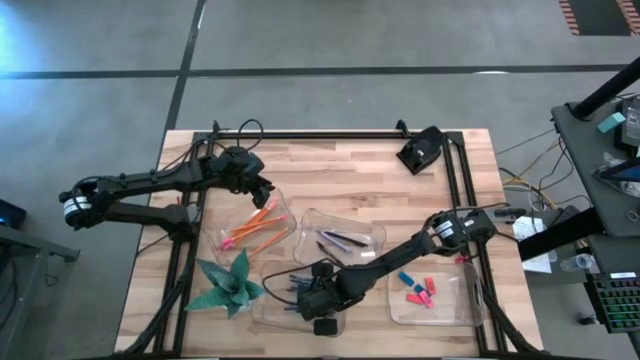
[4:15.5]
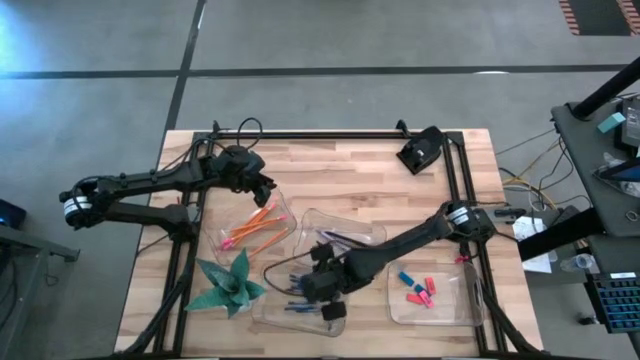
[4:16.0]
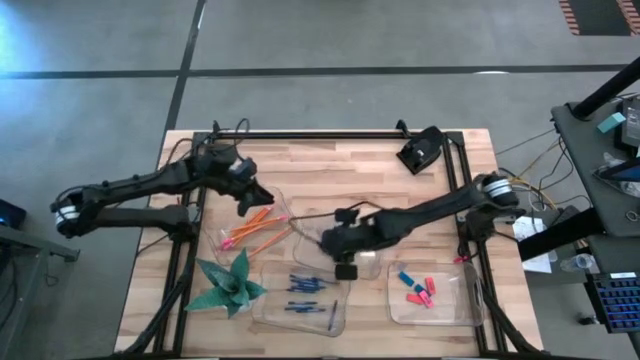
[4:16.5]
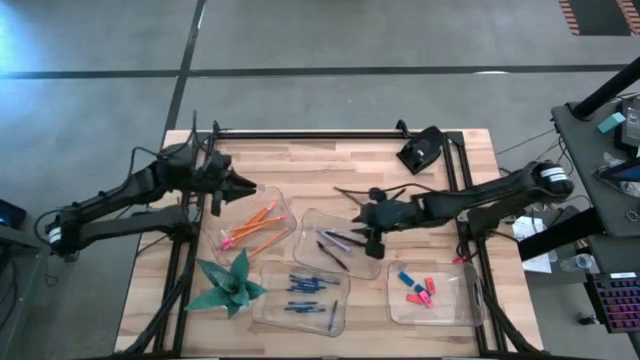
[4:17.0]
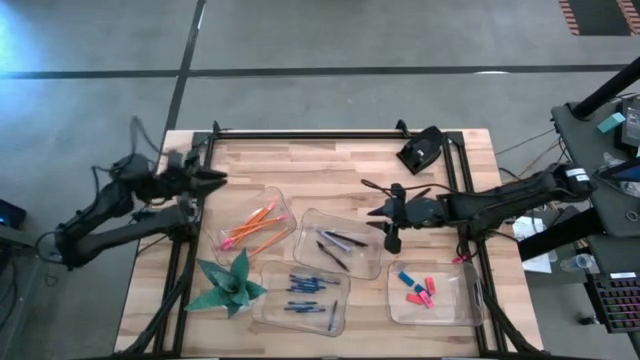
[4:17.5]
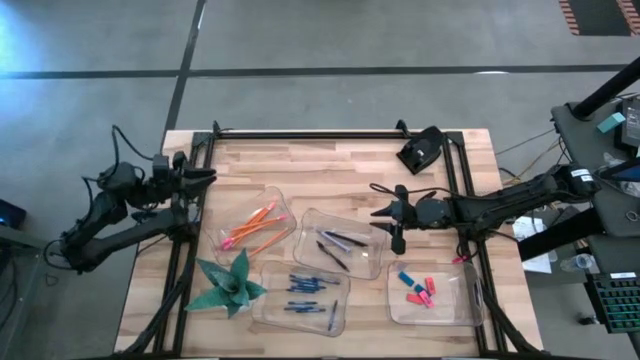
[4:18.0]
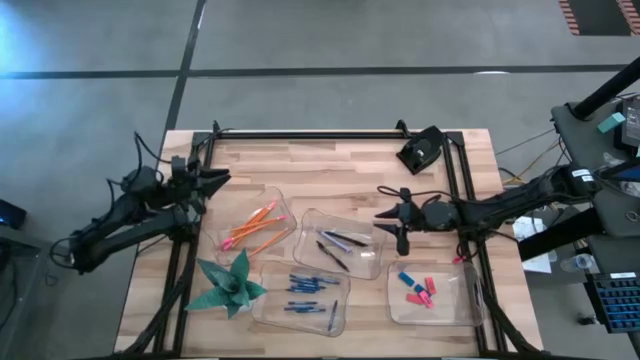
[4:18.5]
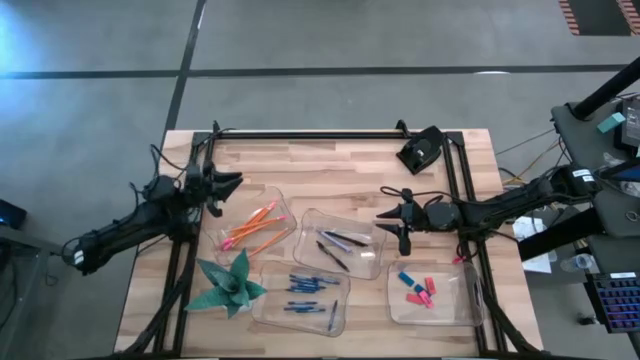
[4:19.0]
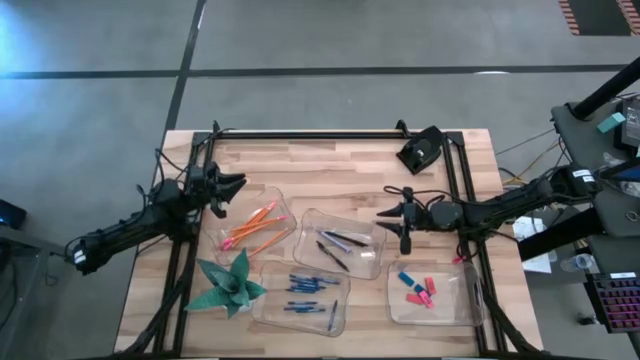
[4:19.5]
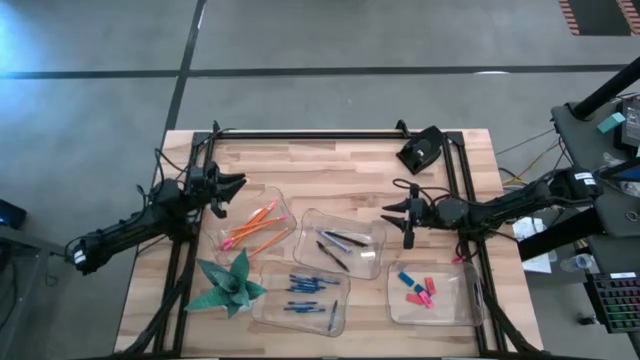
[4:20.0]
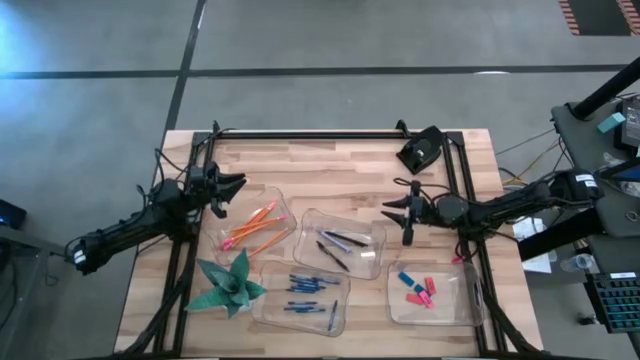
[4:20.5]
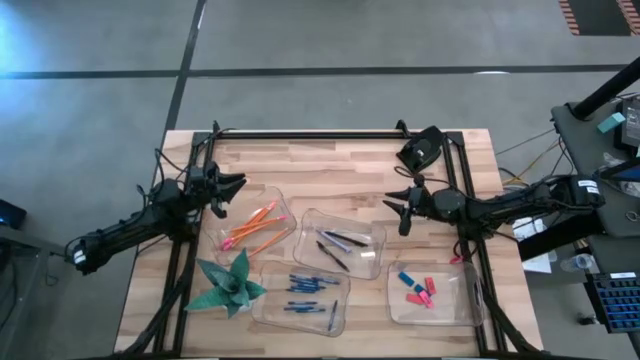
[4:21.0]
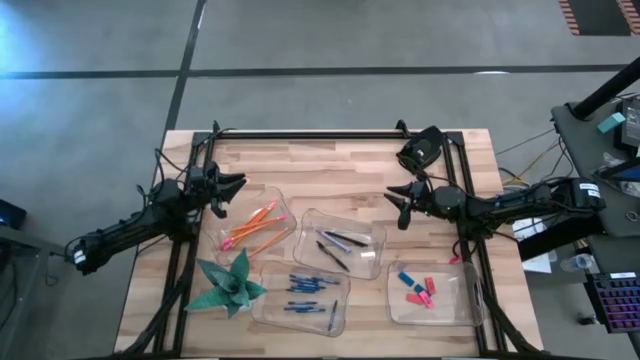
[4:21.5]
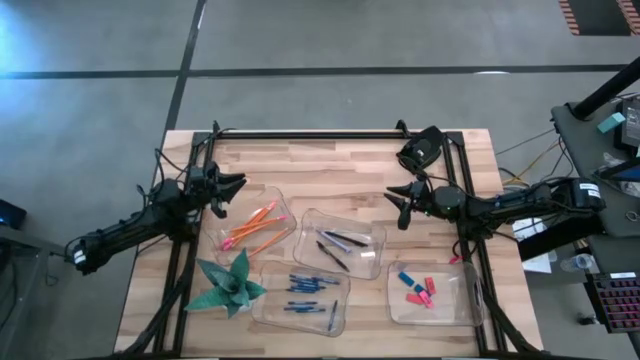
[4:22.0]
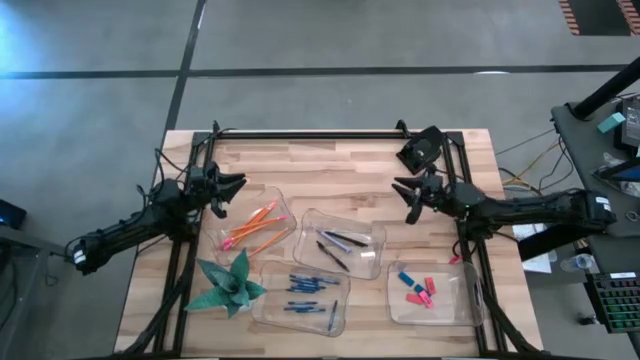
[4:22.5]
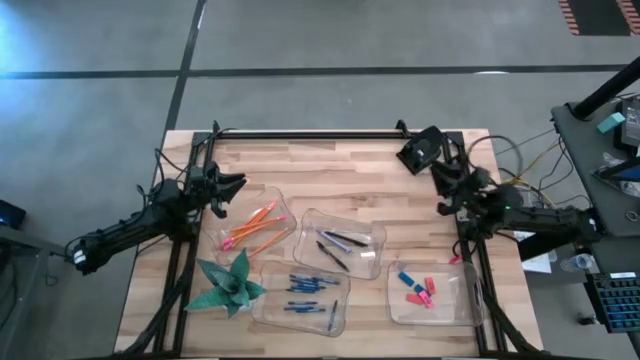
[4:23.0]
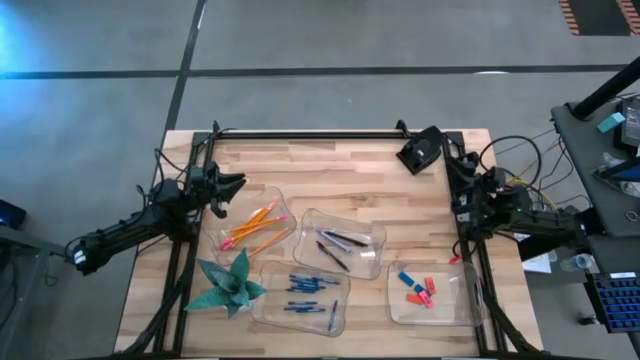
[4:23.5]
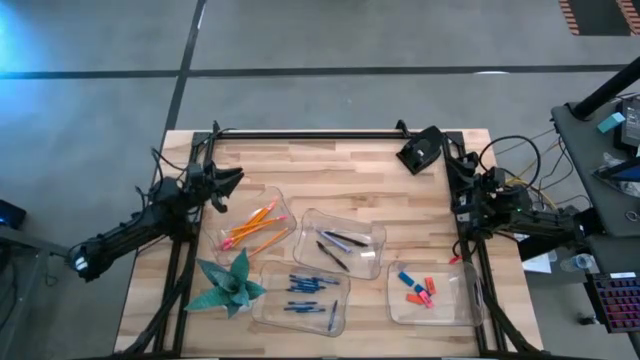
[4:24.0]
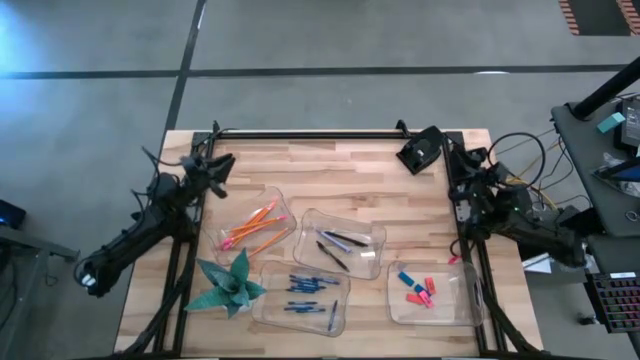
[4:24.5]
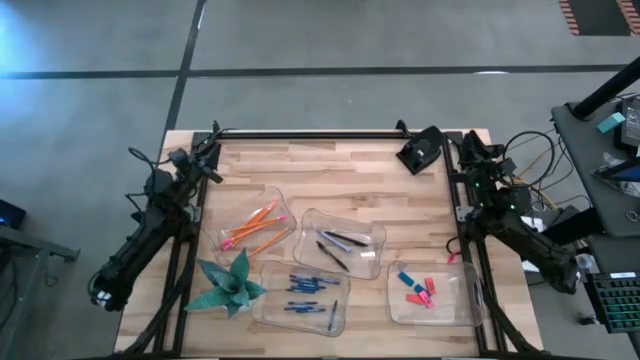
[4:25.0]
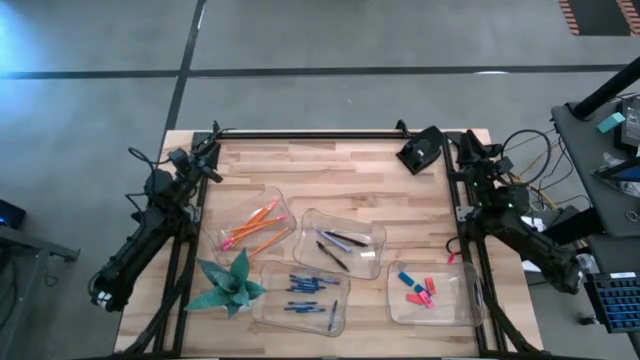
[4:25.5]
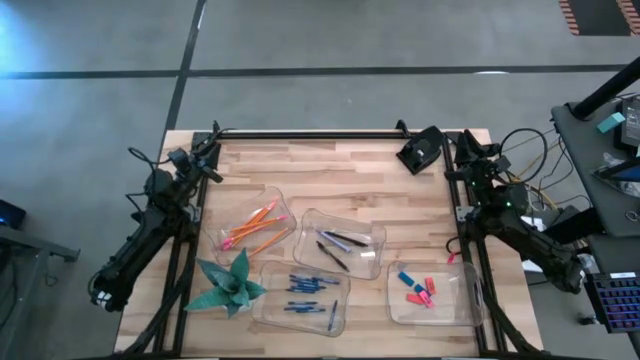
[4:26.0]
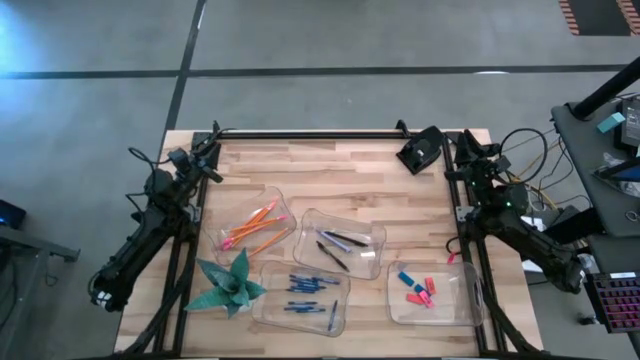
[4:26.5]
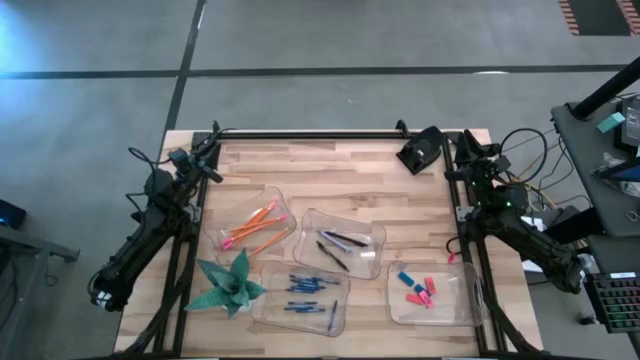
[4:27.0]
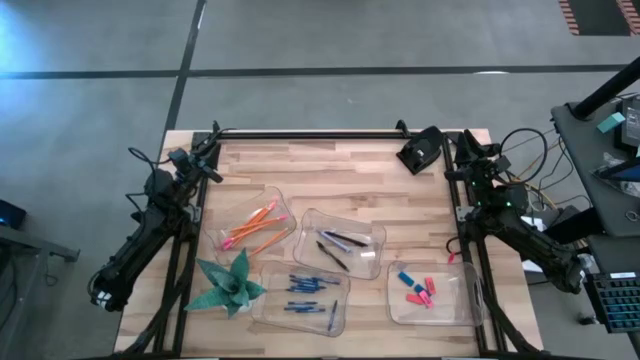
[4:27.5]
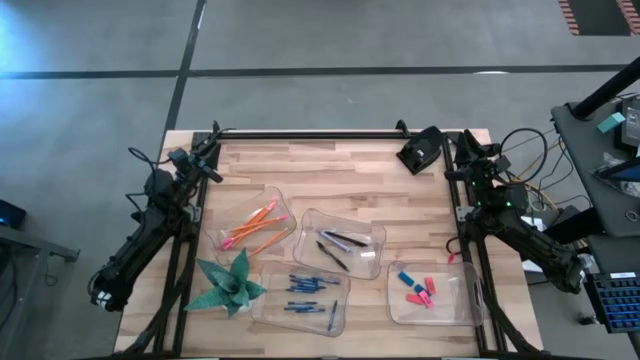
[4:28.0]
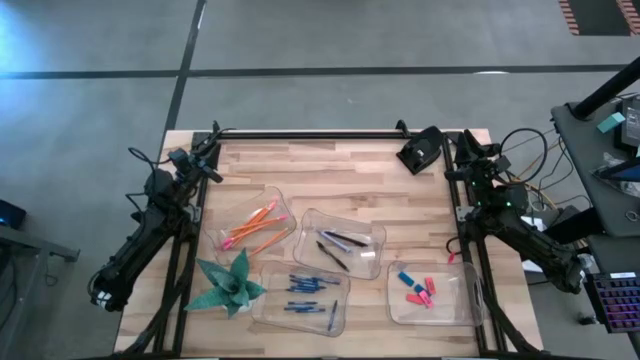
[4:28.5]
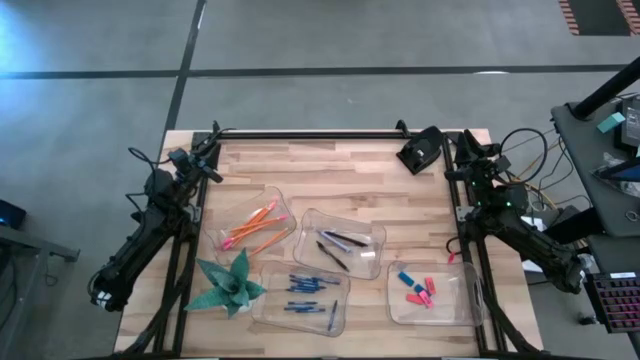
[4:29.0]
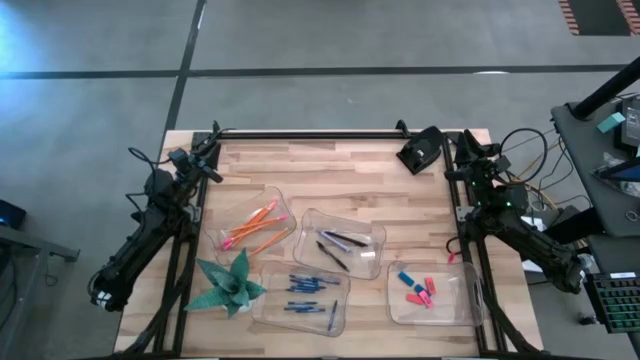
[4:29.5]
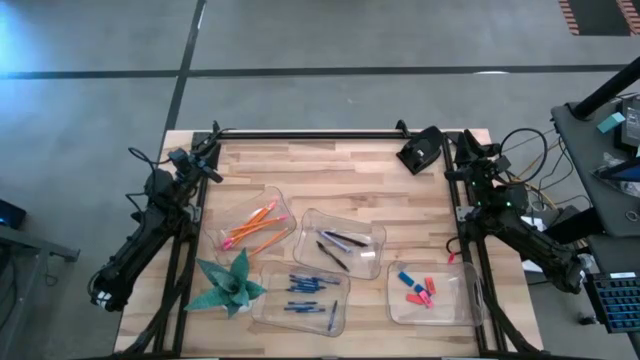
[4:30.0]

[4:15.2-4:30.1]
Task: Sort crayons/erasers/pens/pencils in bins
Return to Home Position

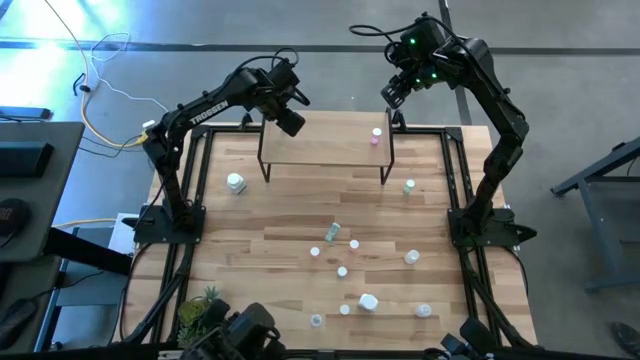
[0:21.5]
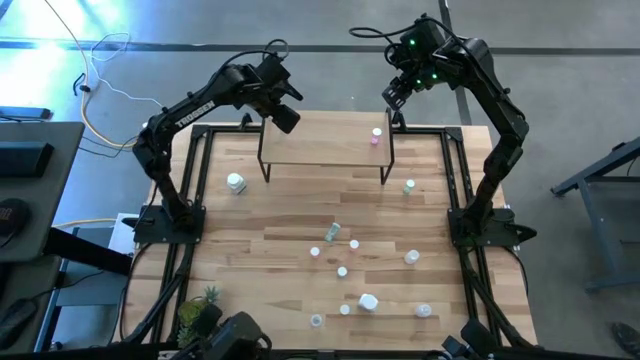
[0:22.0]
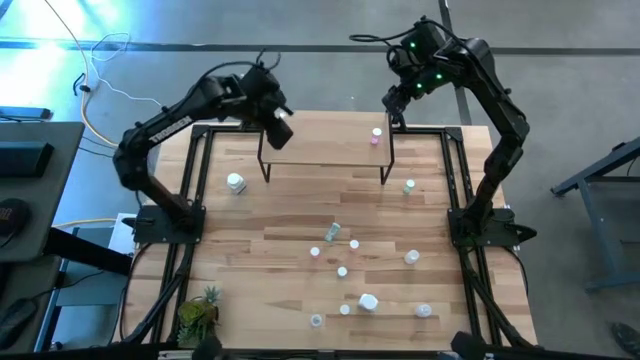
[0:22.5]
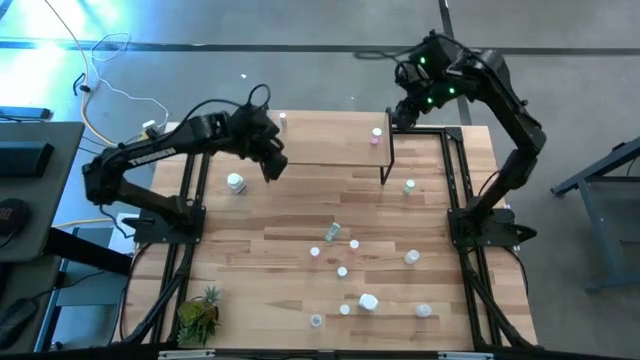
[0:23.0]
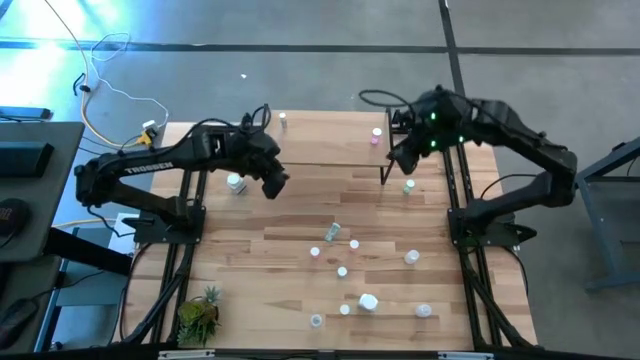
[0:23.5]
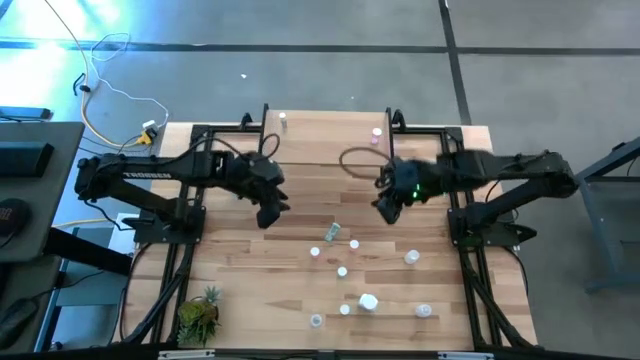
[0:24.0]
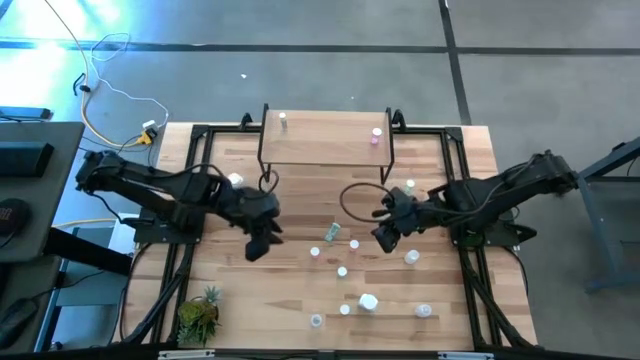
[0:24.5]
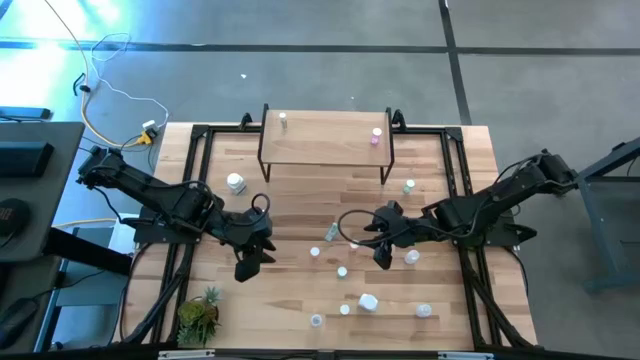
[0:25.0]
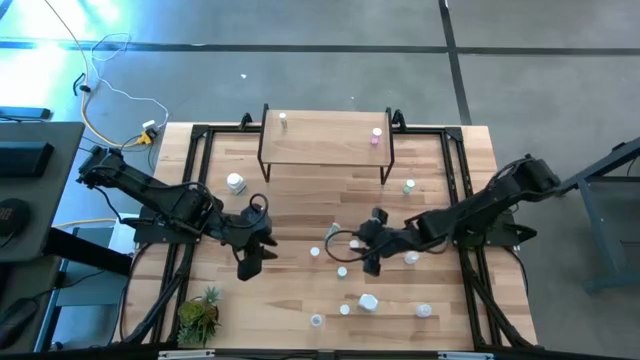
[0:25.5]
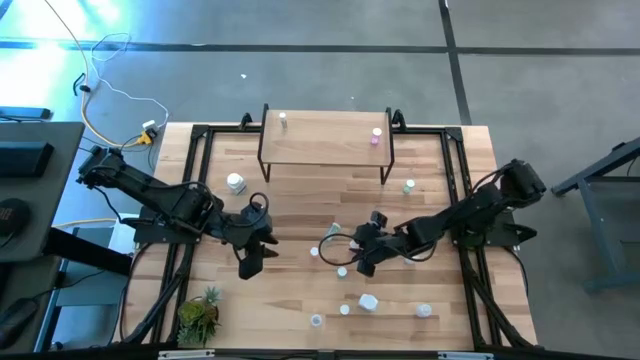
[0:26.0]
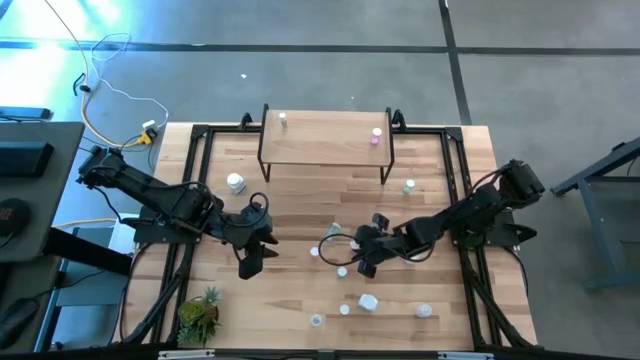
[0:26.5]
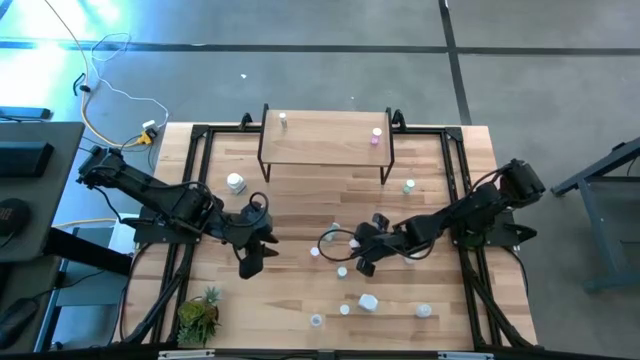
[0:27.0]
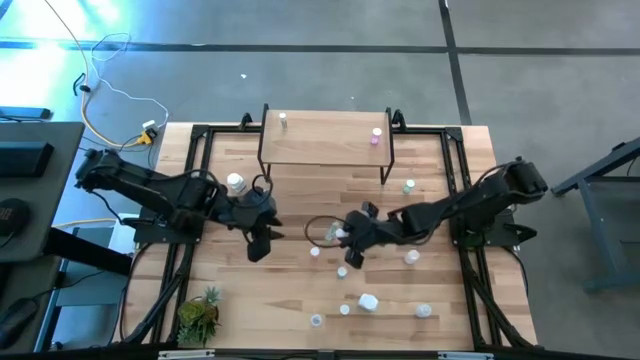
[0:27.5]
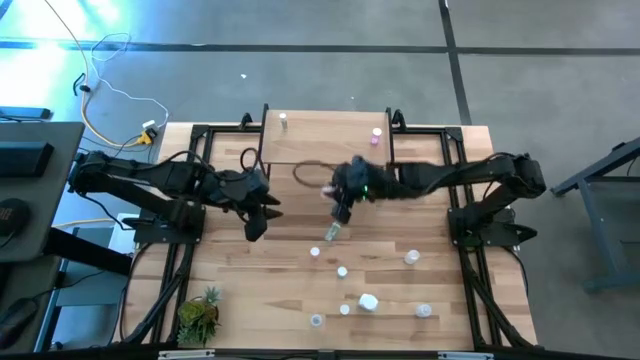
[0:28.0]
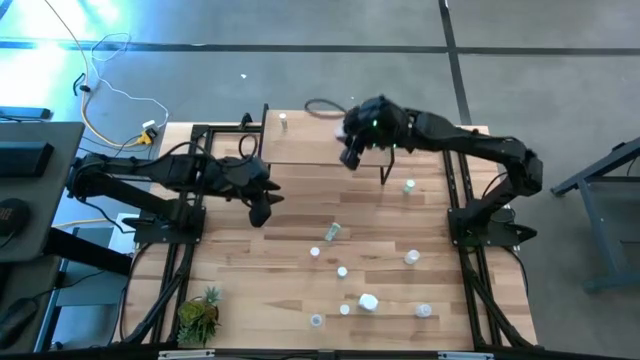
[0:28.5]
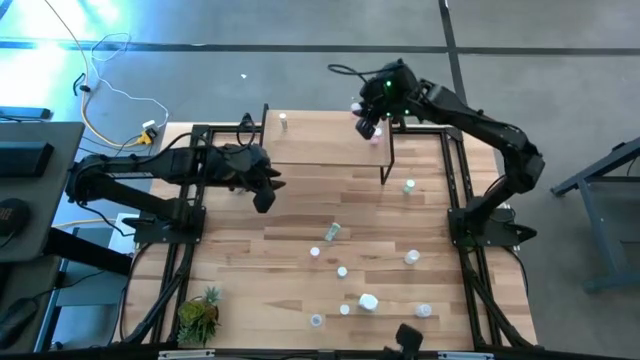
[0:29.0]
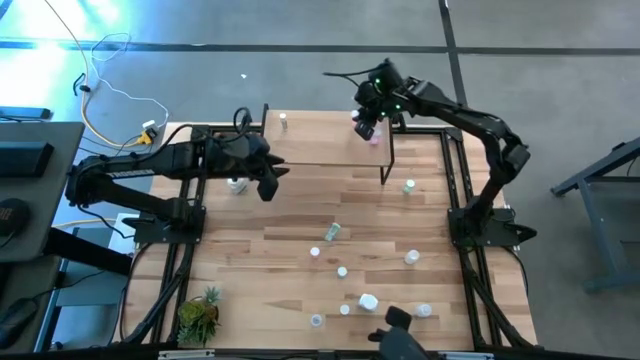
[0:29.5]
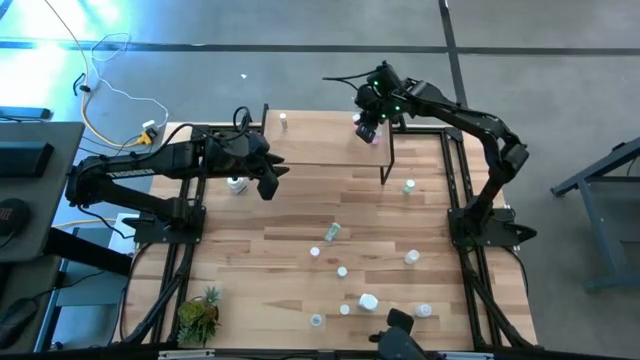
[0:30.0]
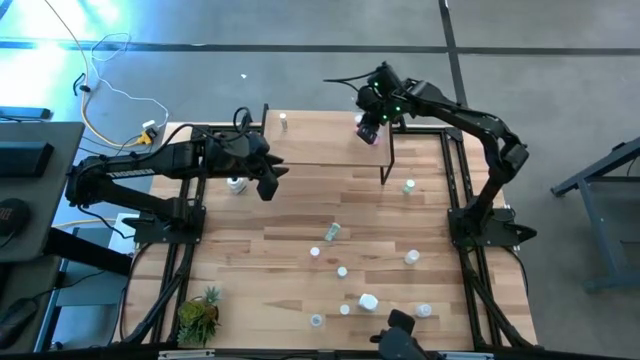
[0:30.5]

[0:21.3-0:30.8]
Task: Pick and place medicine bottles onto shelf by color
Put the right pink pill bottle on the shelf
